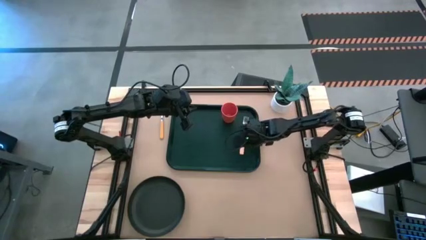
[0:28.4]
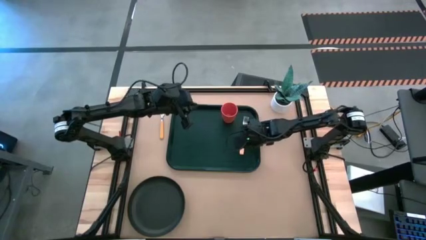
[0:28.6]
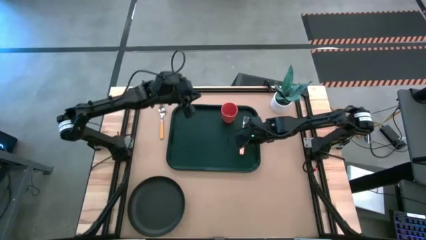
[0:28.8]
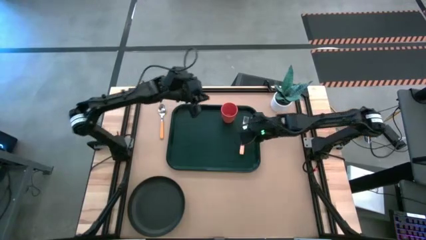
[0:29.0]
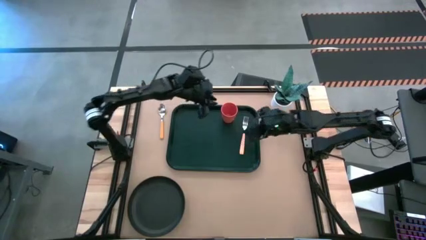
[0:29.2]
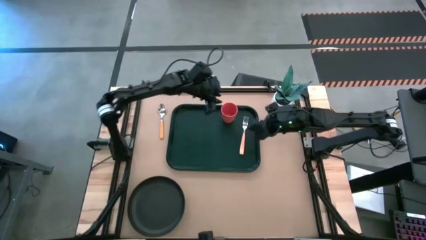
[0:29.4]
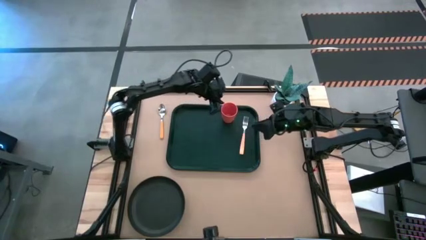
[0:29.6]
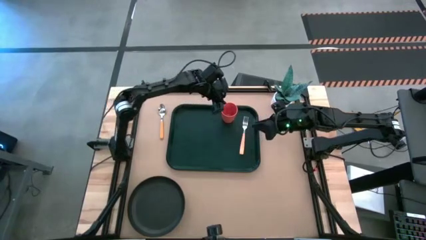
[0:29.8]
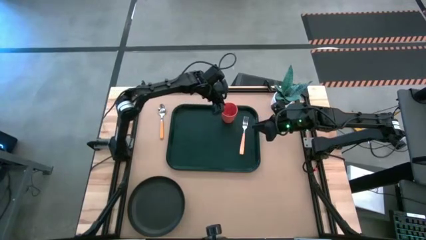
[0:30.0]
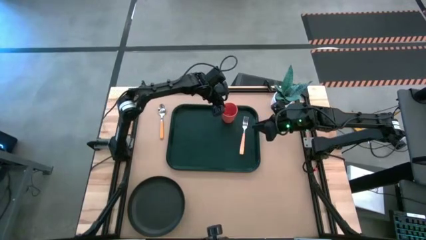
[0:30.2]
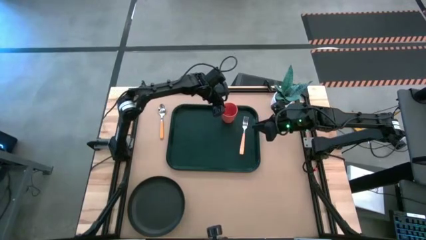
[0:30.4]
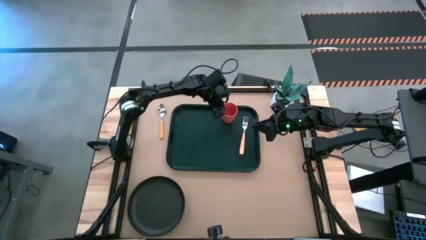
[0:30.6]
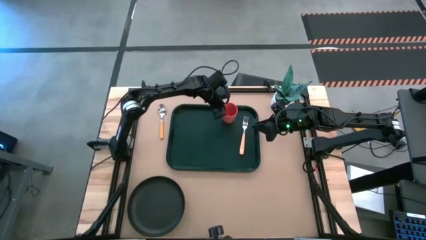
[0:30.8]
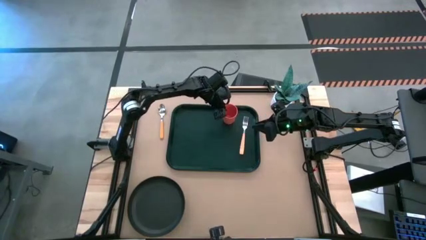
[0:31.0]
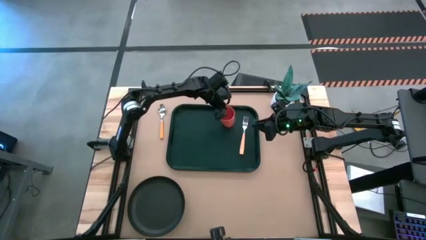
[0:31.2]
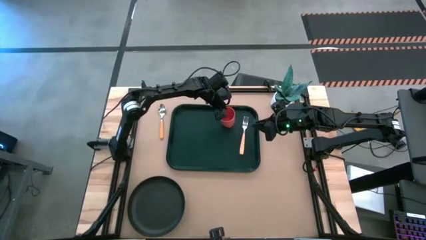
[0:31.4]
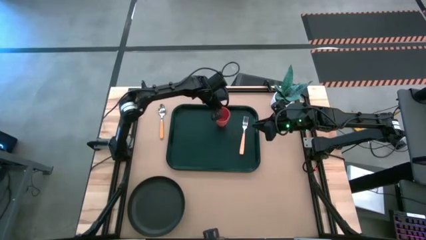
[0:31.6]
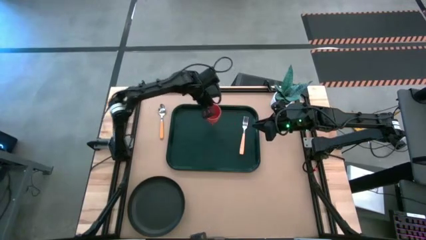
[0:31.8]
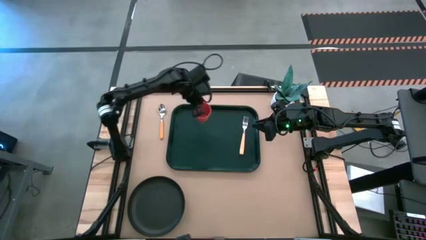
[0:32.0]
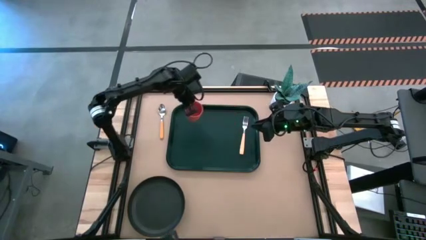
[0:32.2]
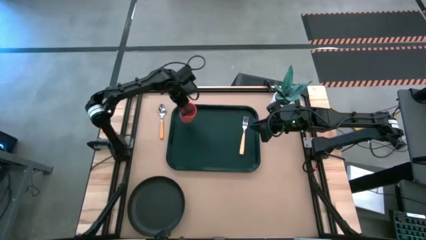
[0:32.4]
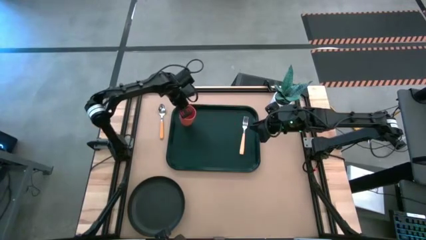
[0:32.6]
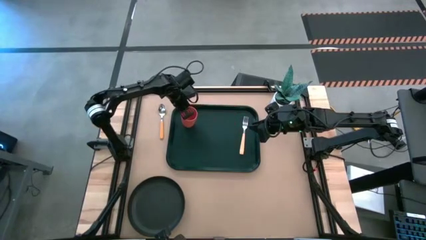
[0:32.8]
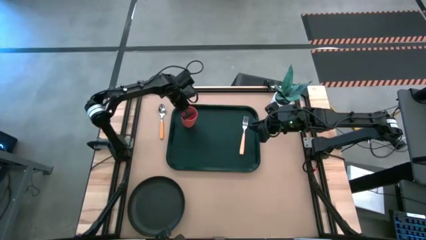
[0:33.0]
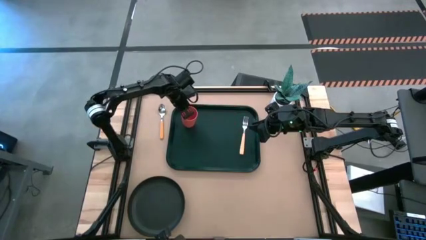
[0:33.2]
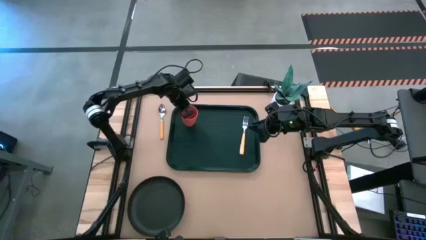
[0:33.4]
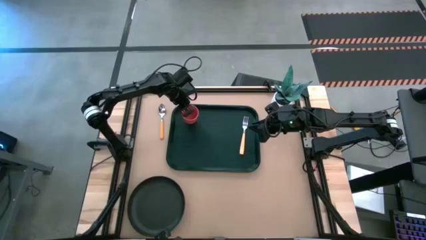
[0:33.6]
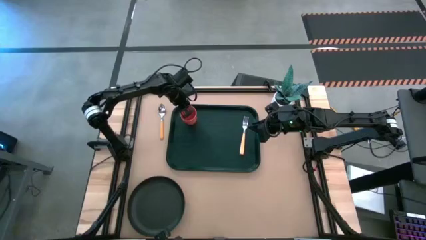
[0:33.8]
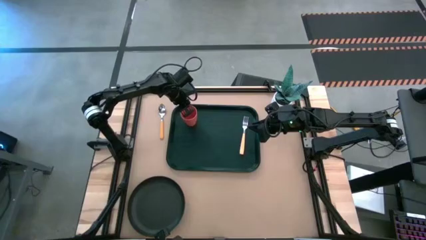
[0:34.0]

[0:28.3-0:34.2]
Task: Pick and place plate/cup/fork/spoon on tray
Move the orange cup to the top left of the black serving tray

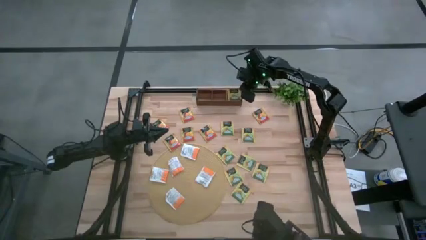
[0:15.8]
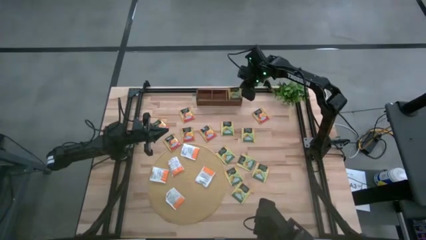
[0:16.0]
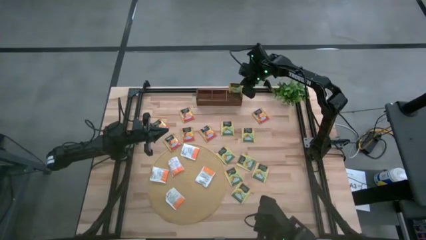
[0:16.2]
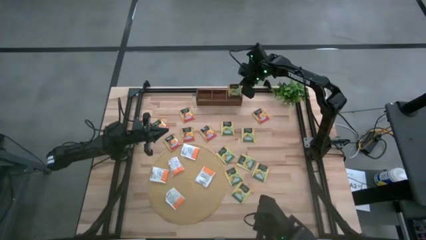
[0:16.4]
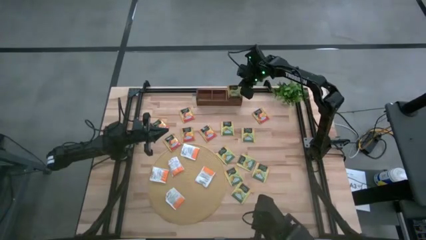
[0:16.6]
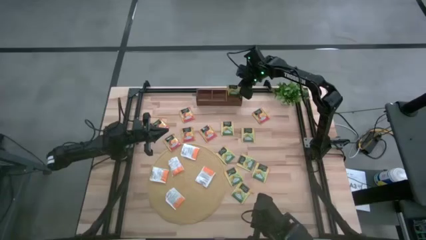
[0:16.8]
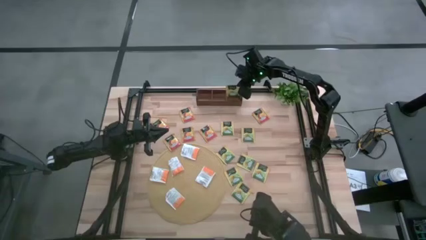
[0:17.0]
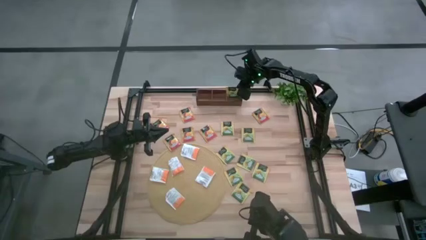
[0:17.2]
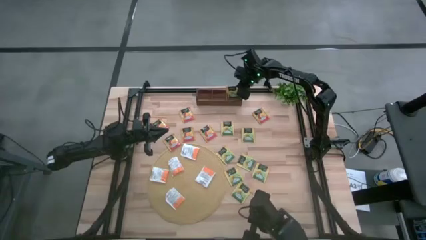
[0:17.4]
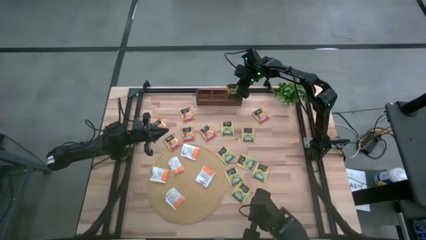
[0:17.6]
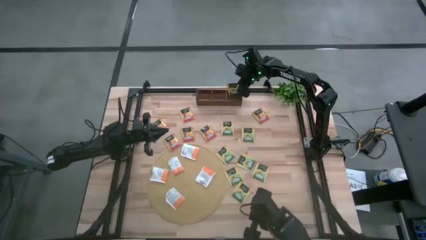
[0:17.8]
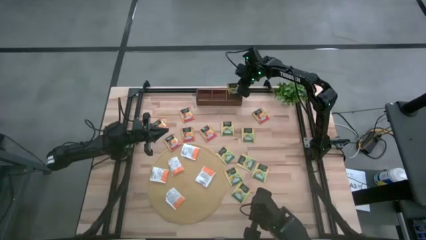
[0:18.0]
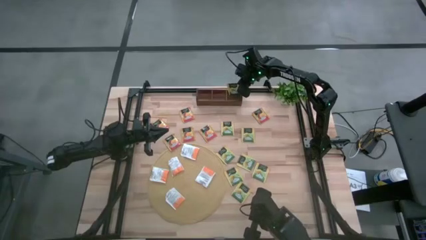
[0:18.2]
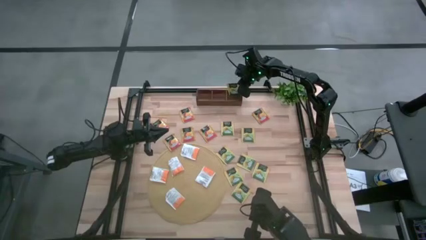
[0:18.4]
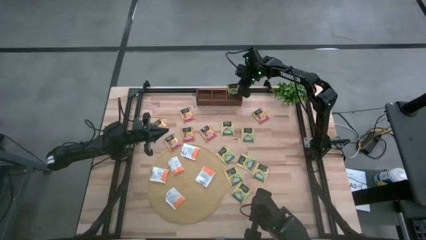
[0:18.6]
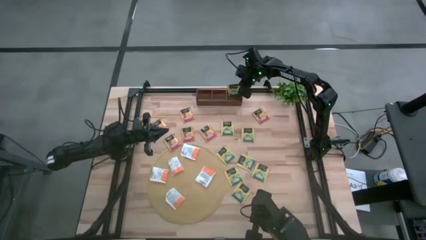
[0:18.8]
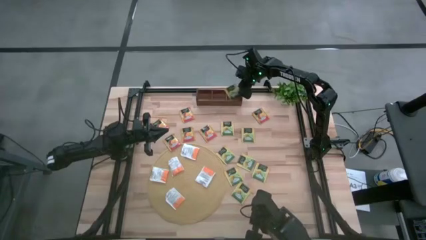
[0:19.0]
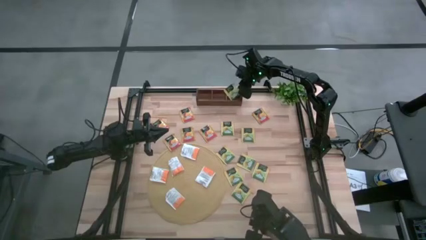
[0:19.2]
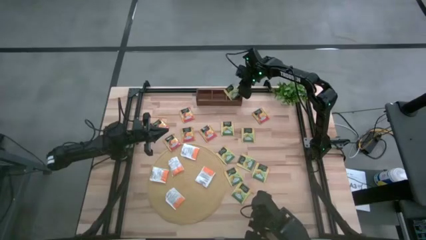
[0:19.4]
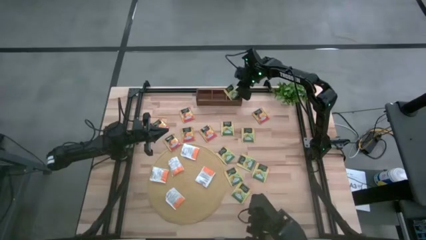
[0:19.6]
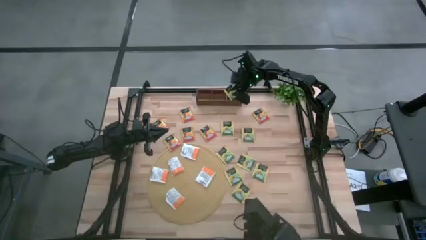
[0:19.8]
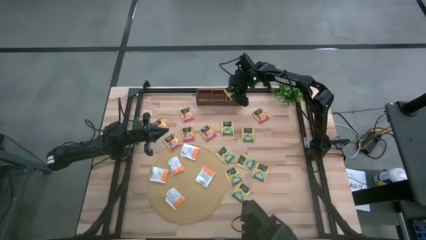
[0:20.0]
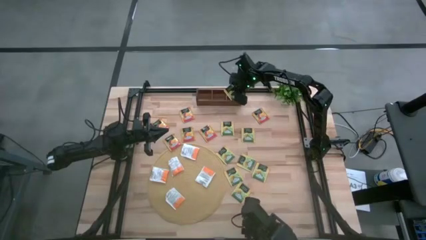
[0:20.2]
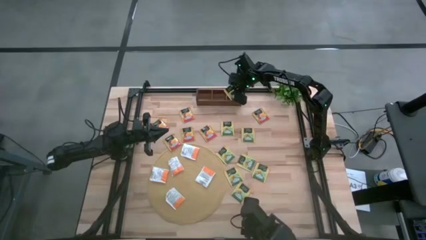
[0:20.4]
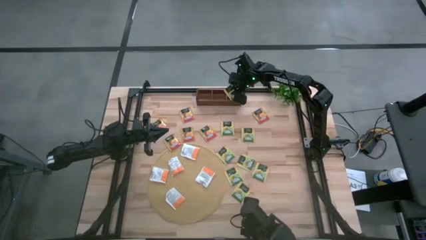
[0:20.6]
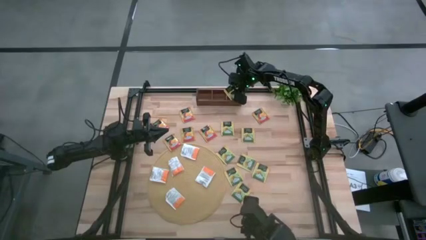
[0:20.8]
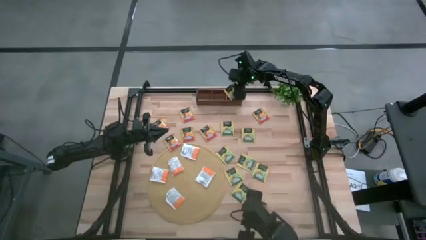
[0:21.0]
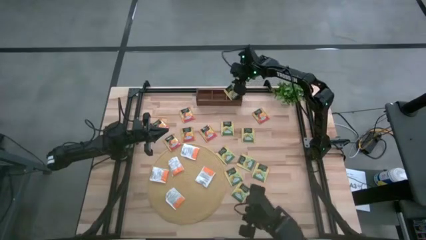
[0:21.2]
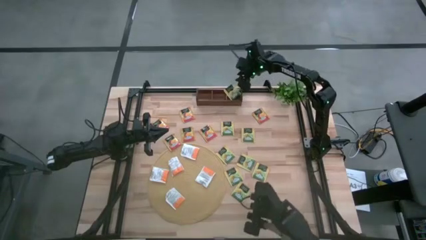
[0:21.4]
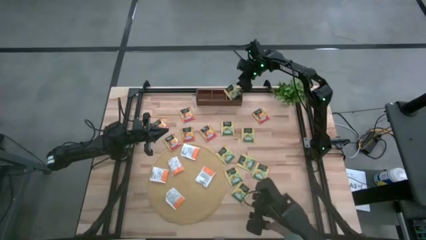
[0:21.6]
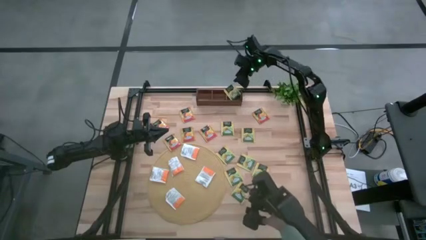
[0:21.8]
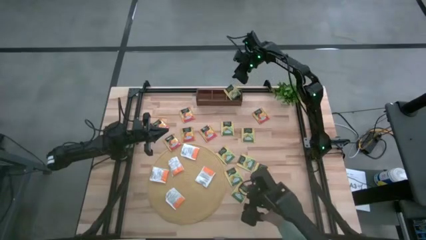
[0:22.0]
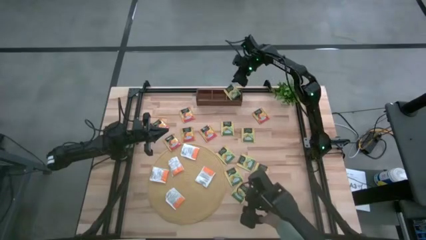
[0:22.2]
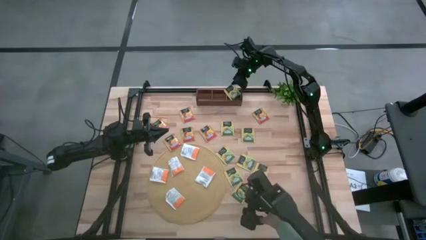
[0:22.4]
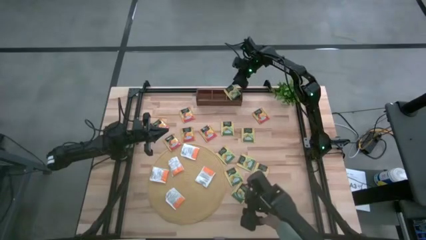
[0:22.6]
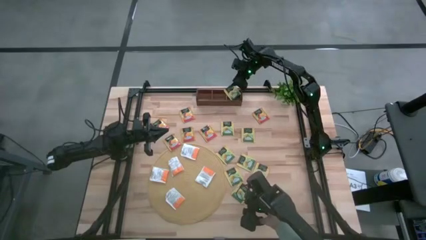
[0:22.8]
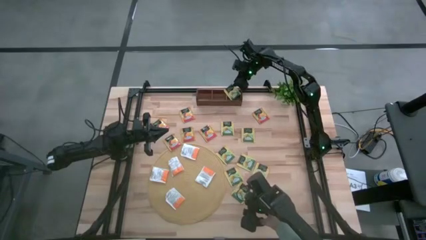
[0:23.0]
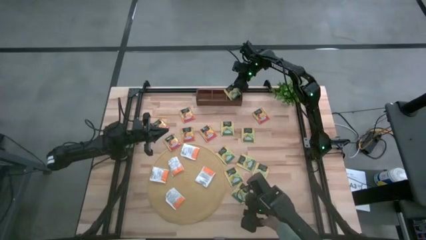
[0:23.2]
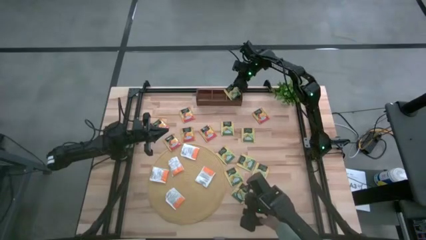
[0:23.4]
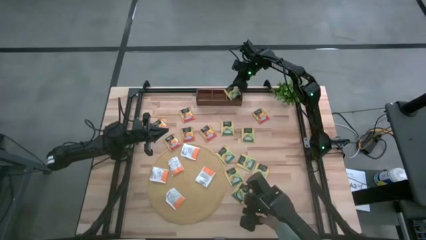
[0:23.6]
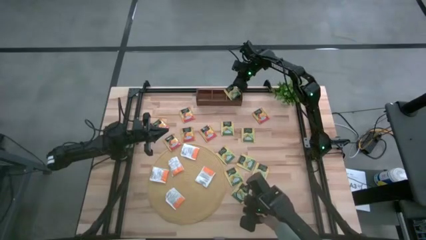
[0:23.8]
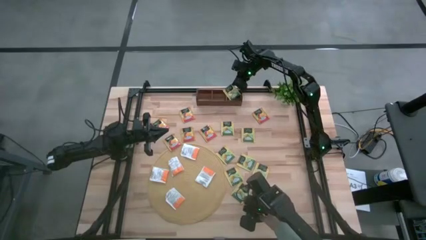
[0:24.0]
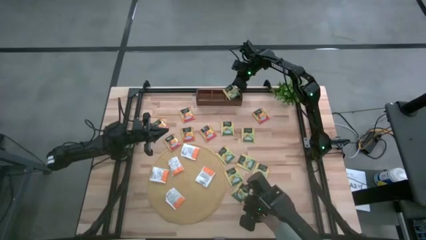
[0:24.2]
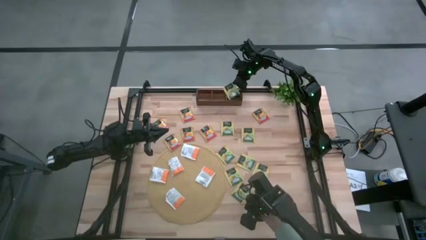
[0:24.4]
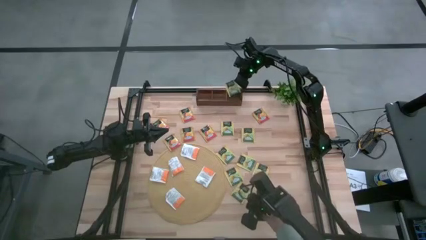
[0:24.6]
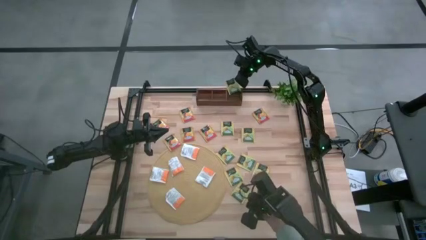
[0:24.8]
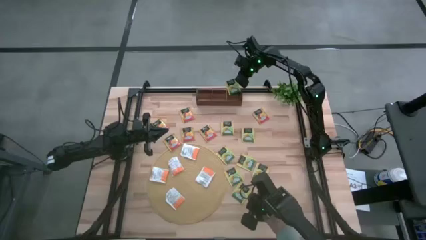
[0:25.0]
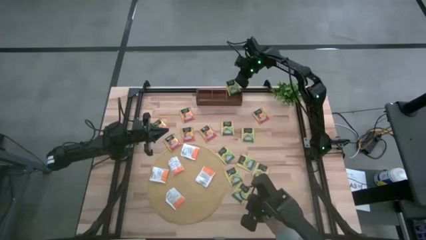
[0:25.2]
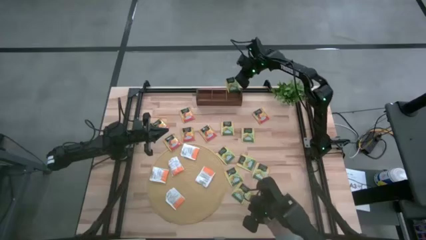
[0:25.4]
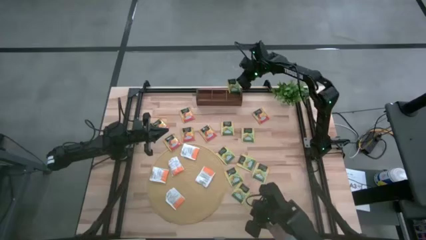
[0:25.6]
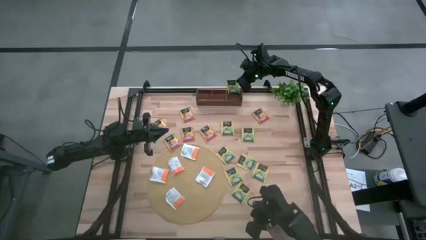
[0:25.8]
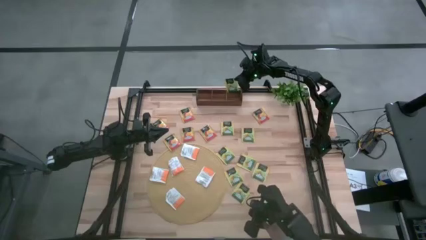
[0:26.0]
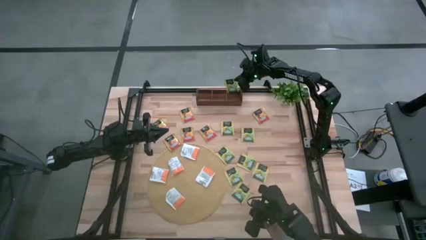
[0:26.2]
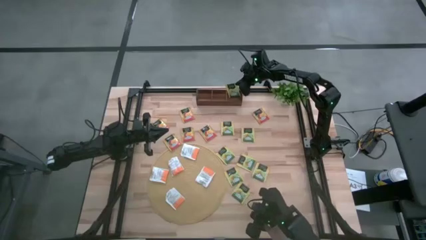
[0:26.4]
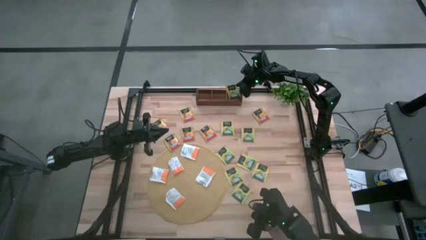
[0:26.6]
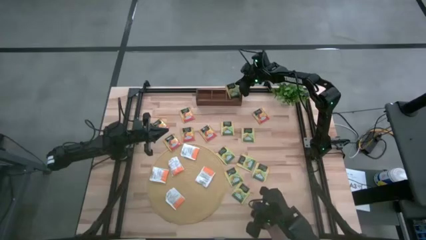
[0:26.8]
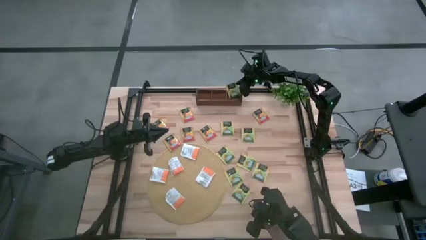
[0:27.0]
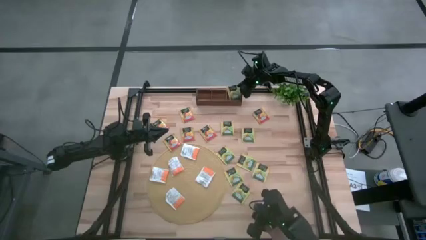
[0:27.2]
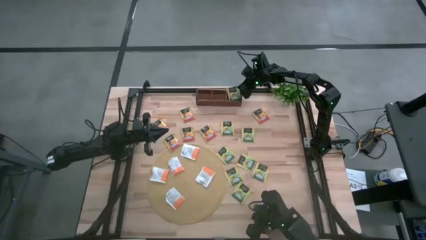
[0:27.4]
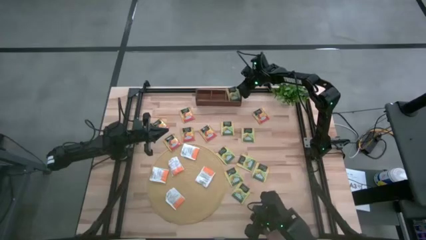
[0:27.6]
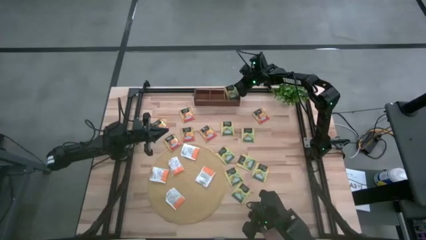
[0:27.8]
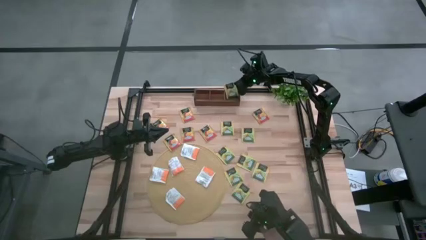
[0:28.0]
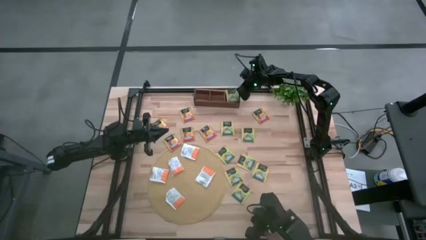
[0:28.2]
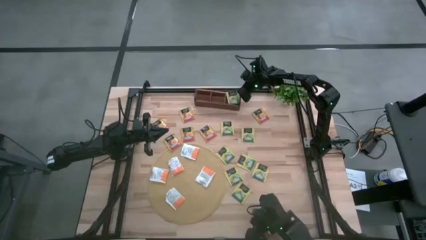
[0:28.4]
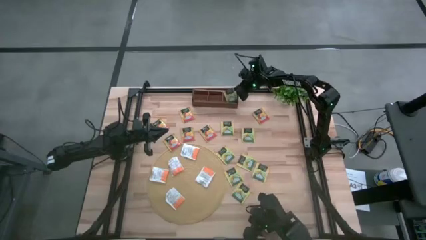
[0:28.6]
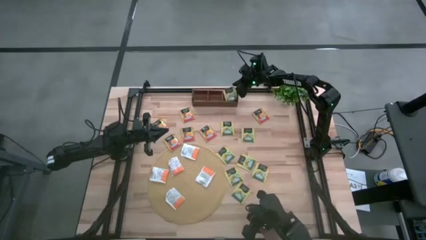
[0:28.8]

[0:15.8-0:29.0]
Task: Pick & Place Tea
Put the green tea bag into the right slot of the wooden organizer
